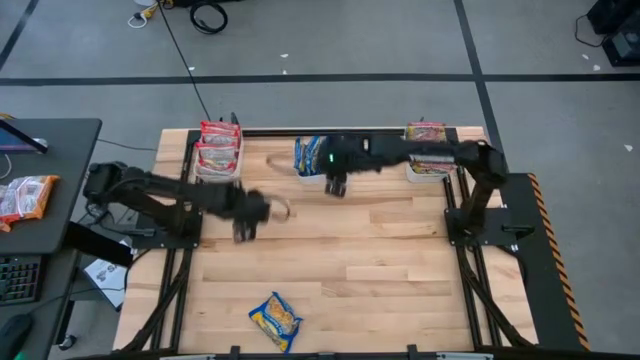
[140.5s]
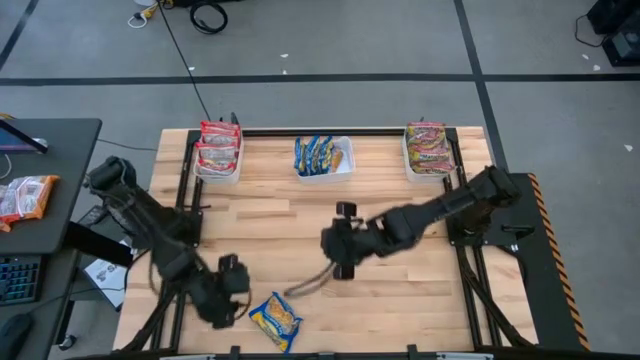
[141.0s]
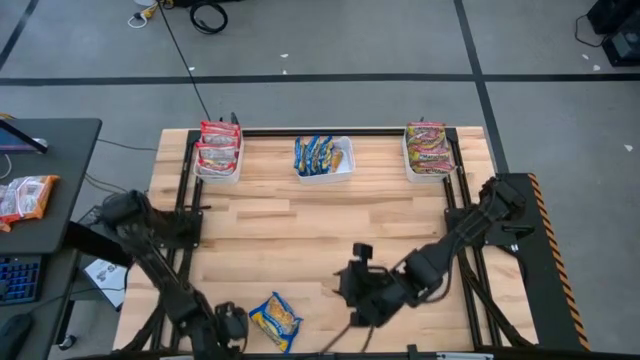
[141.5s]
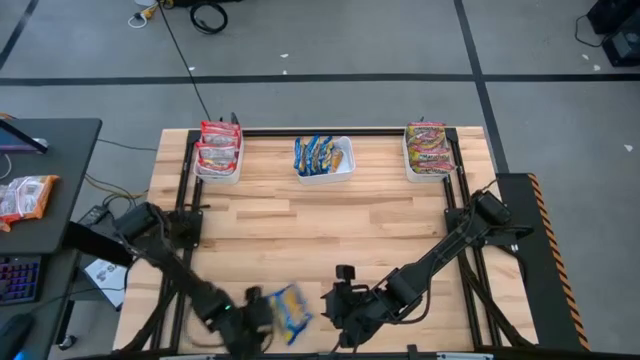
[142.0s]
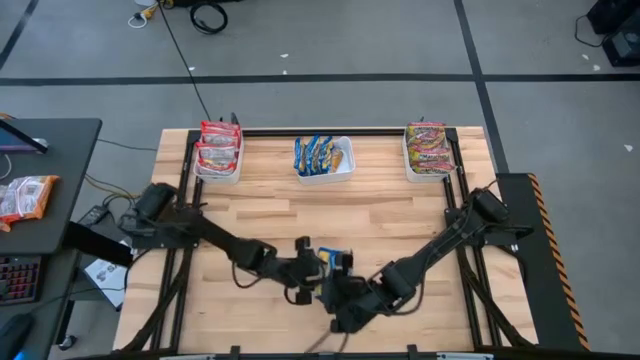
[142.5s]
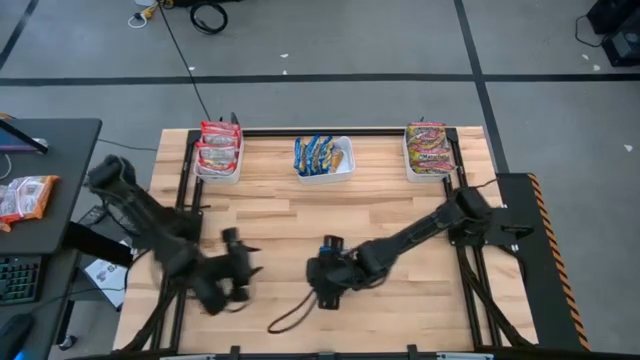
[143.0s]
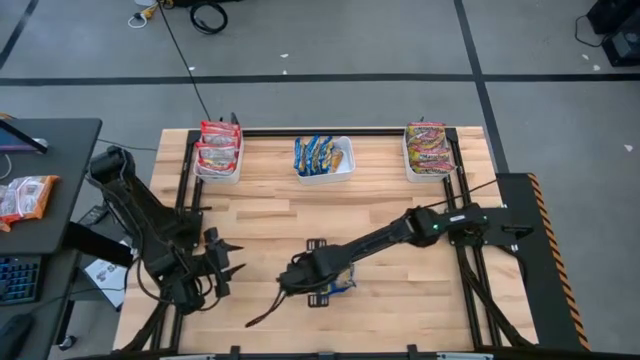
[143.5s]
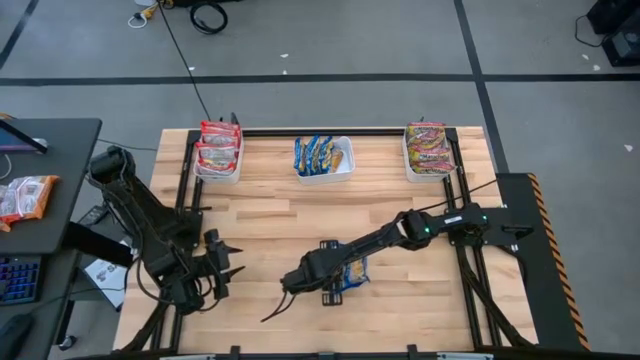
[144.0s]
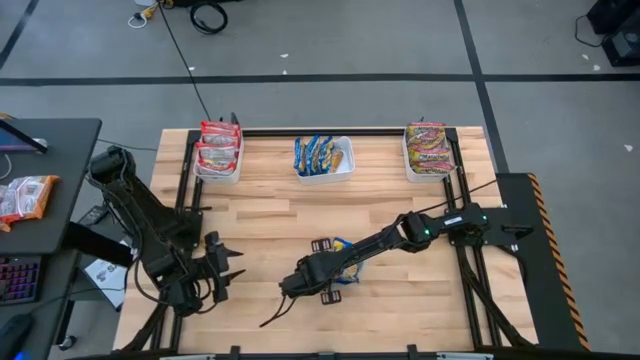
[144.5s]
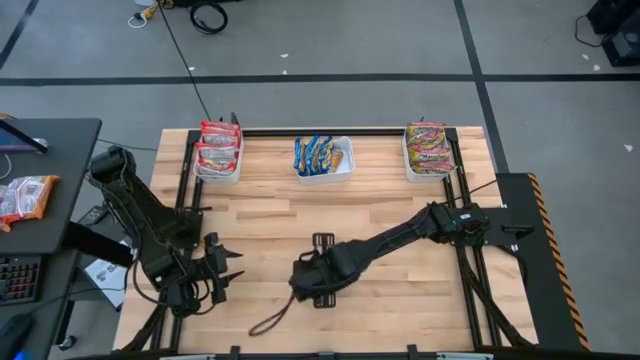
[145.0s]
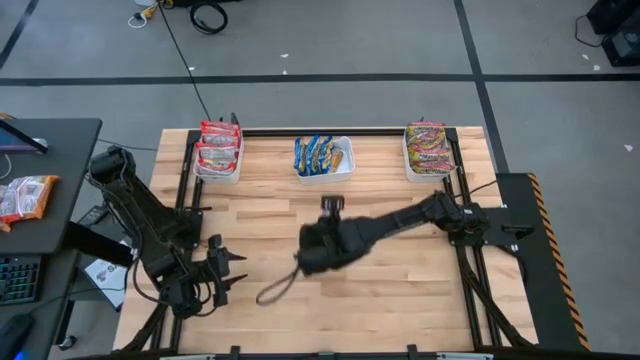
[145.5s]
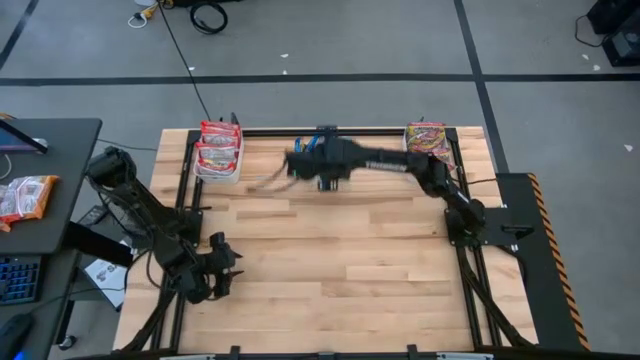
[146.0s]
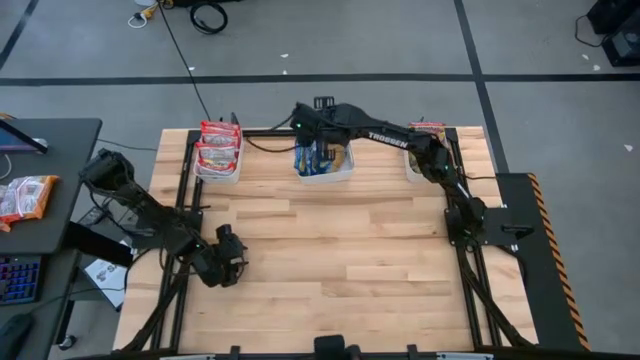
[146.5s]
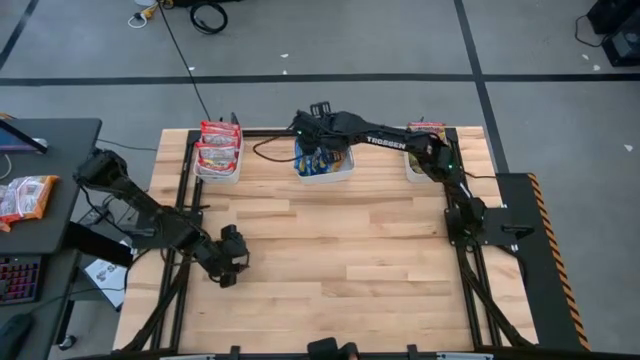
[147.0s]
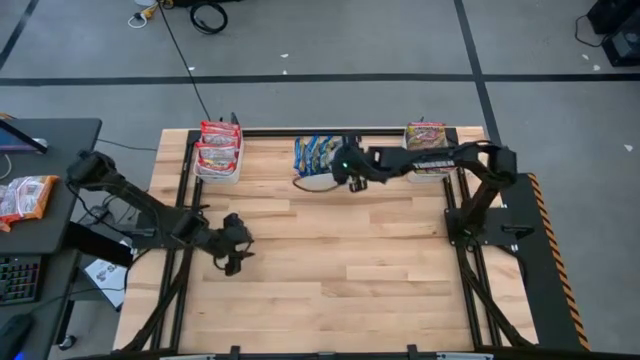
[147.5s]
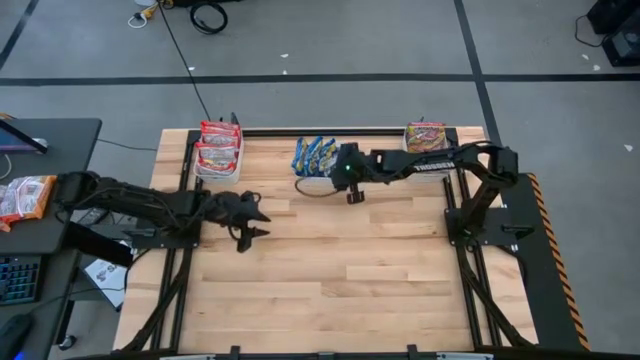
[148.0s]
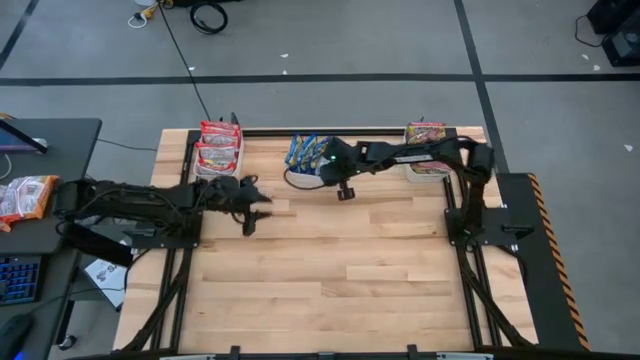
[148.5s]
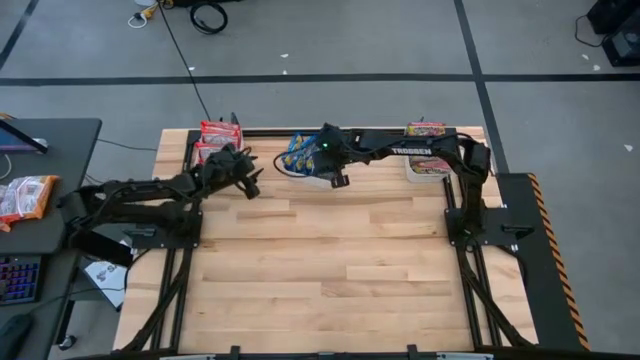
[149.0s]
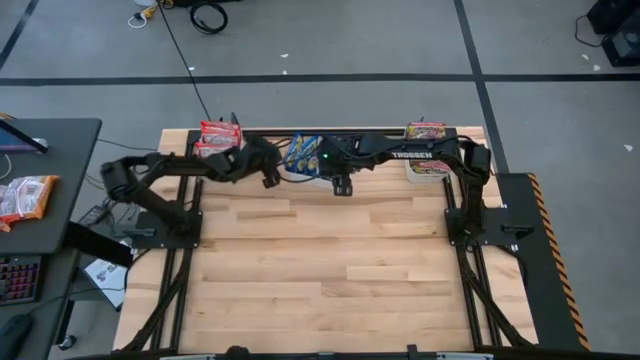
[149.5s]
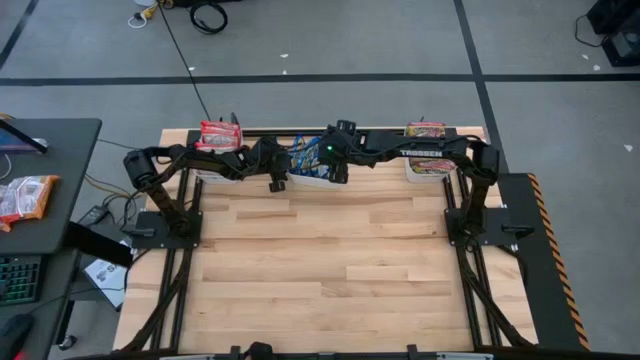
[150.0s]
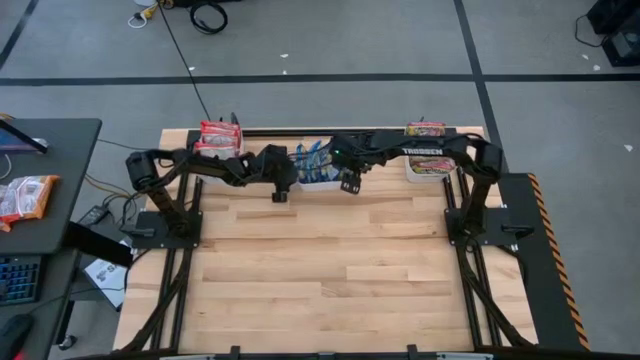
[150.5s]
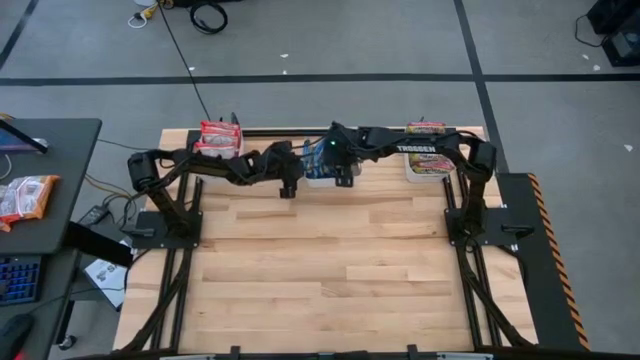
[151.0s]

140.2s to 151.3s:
Task: Sort Maruchan noodles
Put the blue noodle pack into the middle white bin

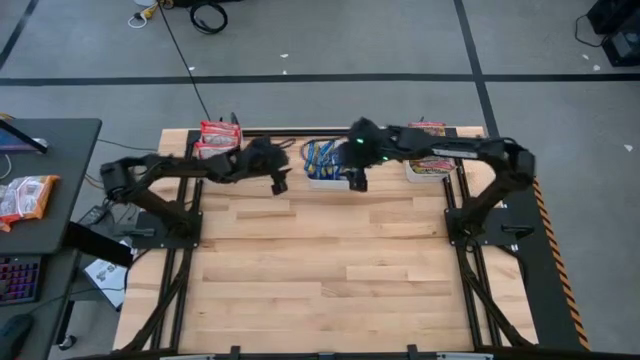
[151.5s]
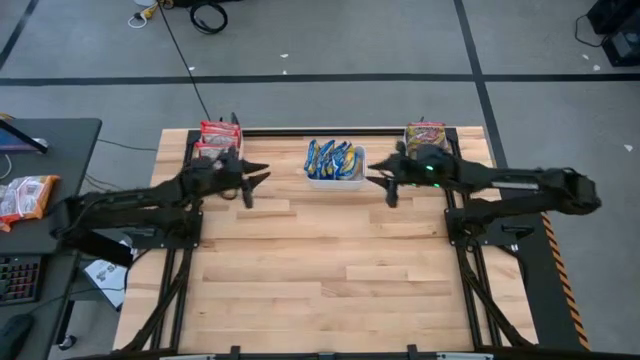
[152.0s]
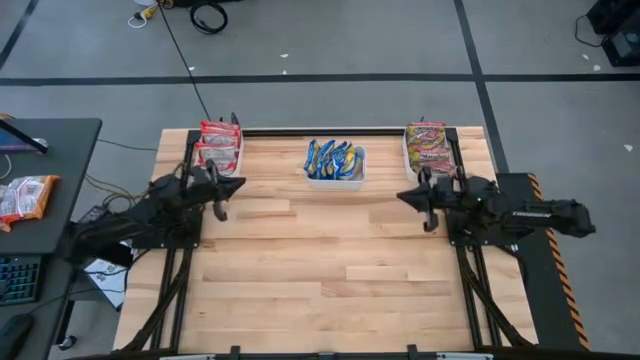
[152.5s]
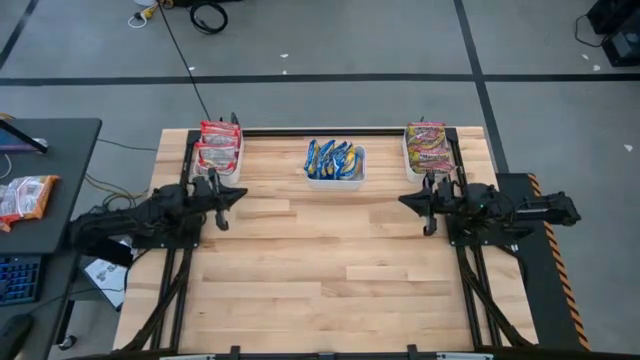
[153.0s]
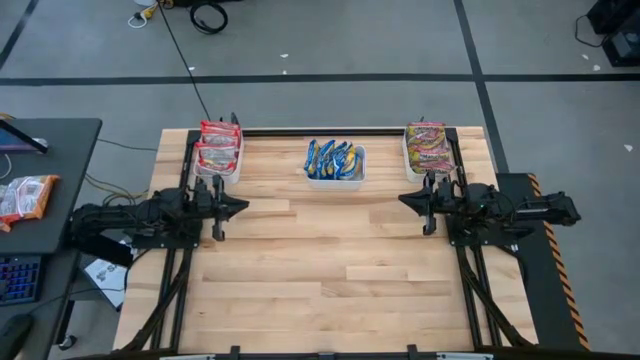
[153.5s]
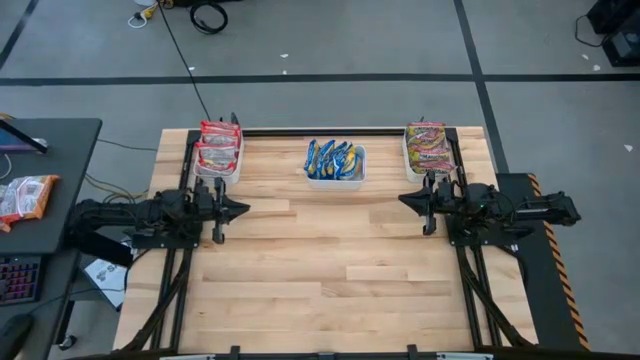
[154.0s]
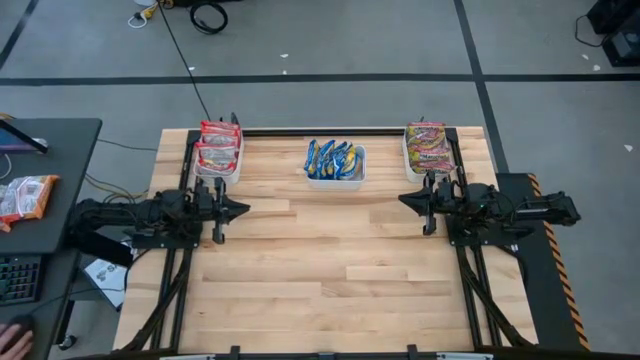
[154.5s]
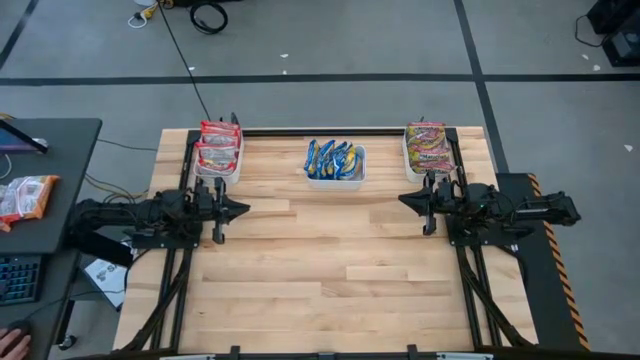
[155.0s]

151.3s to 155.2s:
Return to Home Position

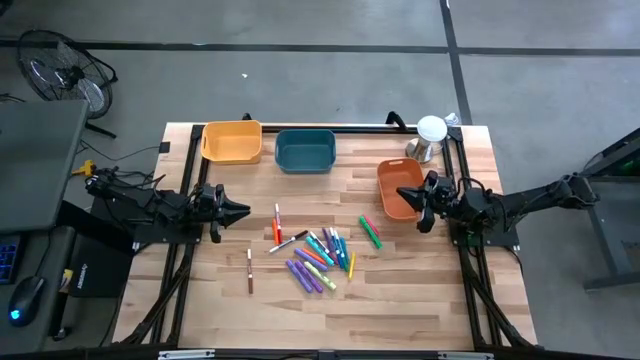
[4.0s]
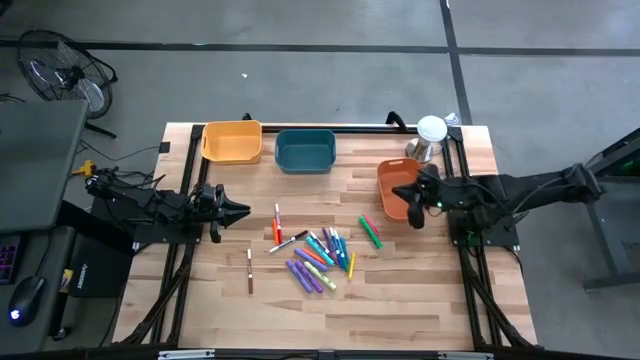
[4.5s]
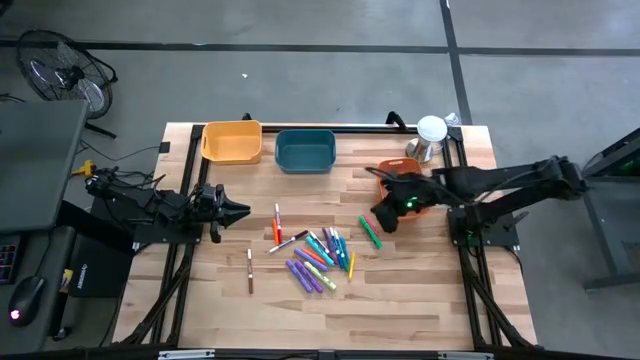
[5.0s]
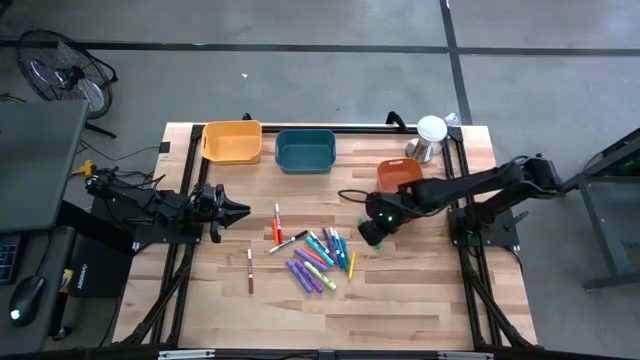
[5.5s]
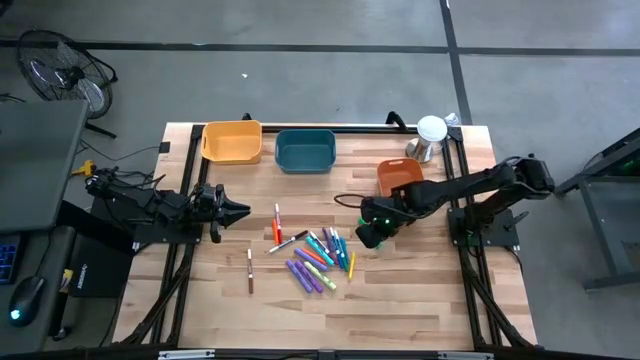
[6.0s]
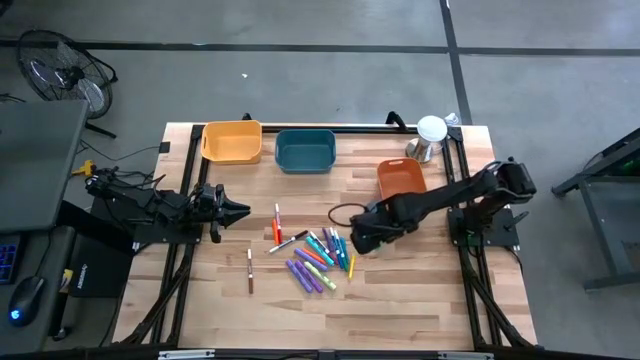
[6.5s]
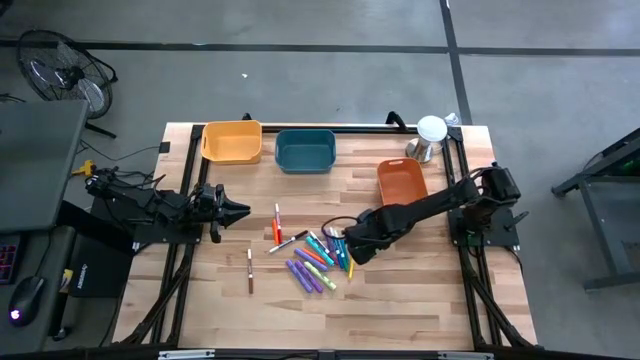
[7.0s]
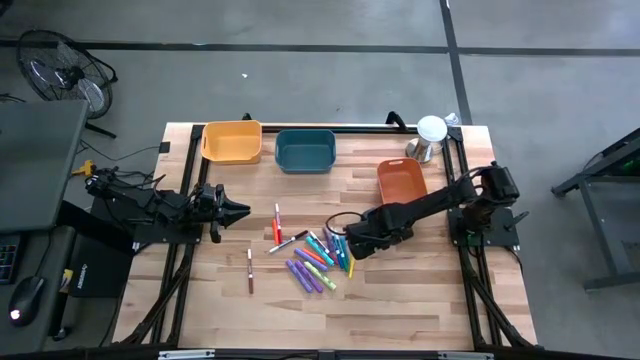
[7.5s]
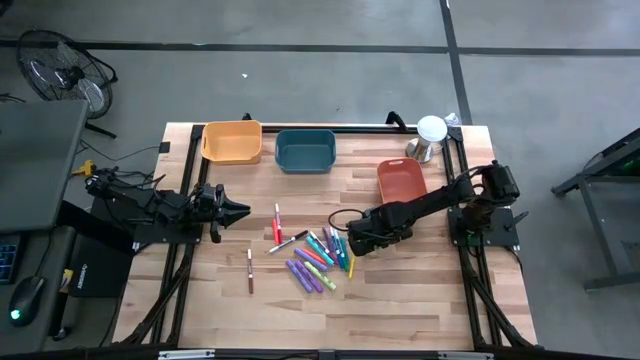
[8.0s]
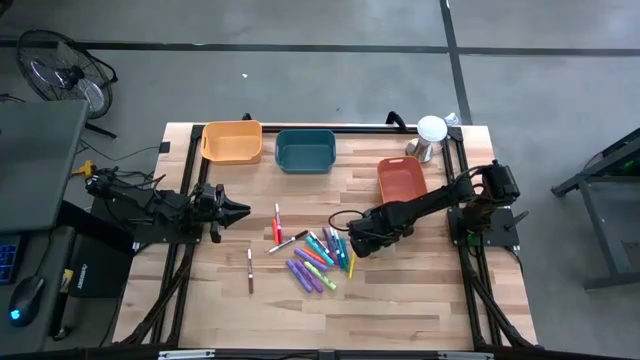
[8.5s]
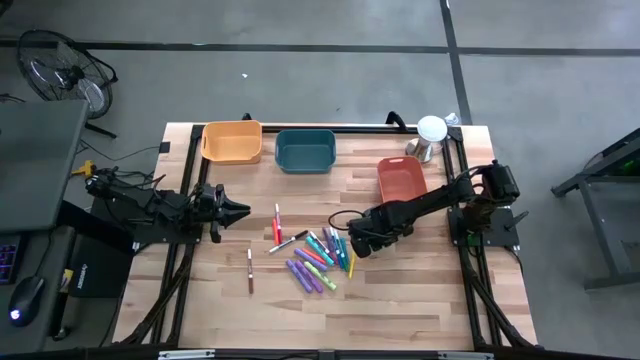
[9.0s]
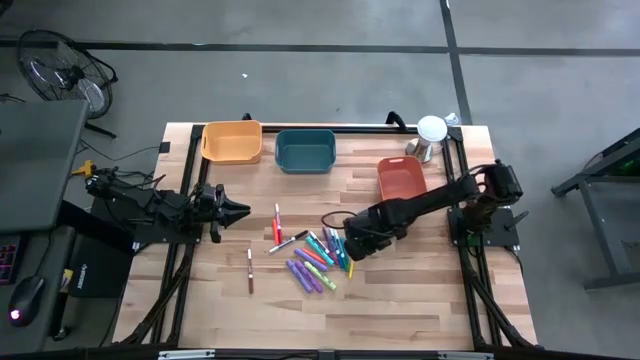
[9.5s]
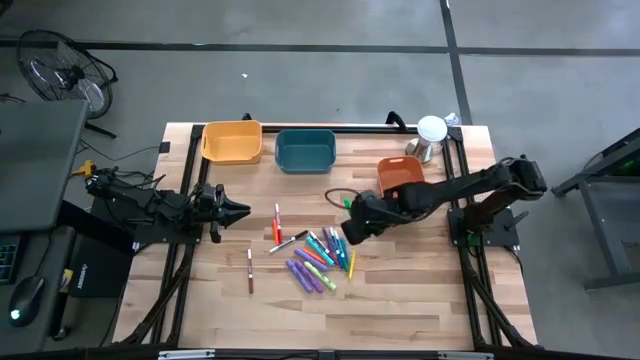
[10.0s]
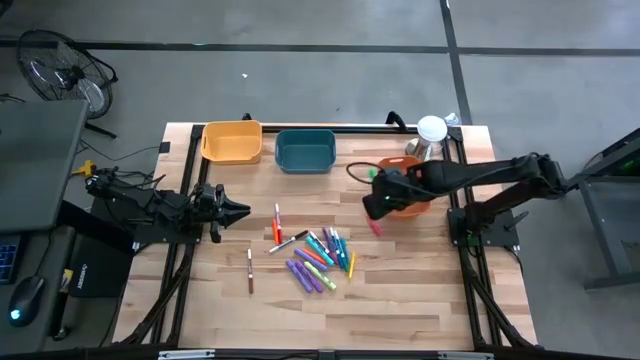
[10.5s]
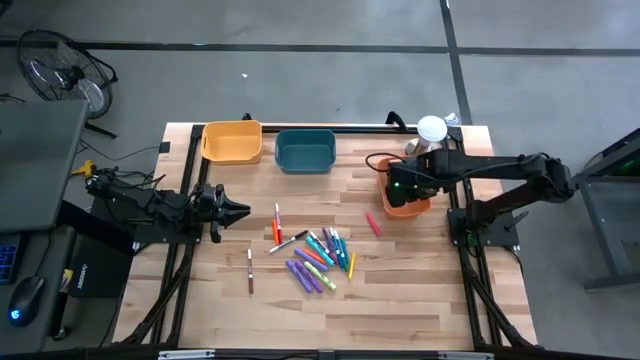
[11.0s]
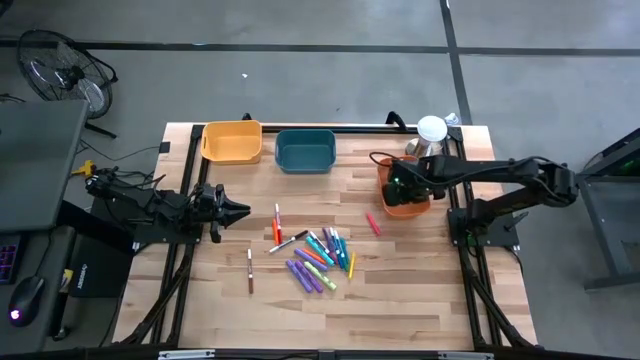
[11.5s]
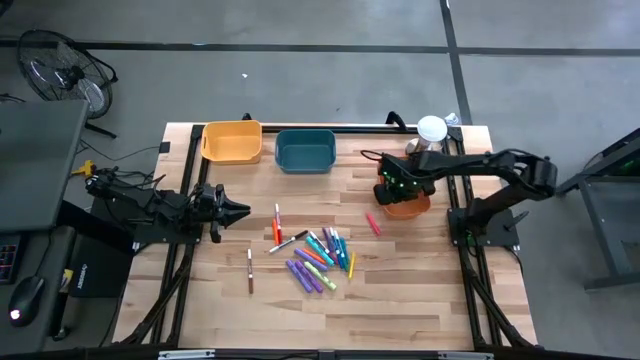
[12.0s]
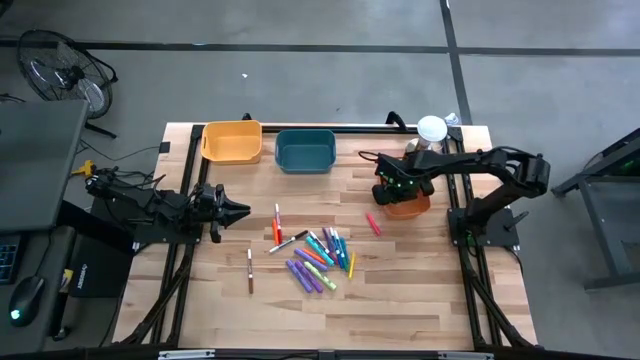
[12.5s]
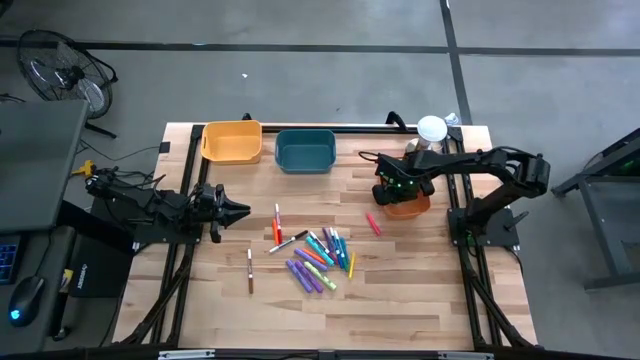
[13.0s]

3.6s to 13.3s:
Task: Pick & Place Markers
Put the green highlighter pen into the orange bin
